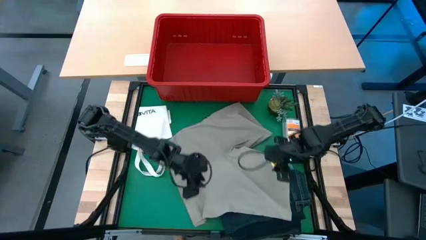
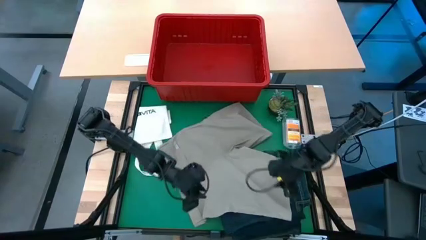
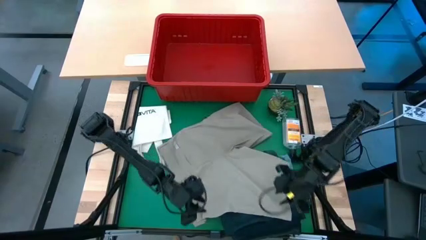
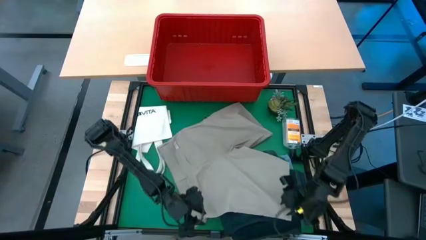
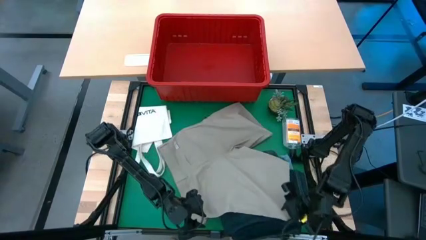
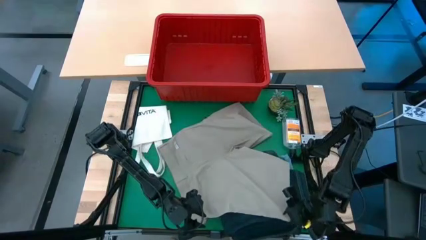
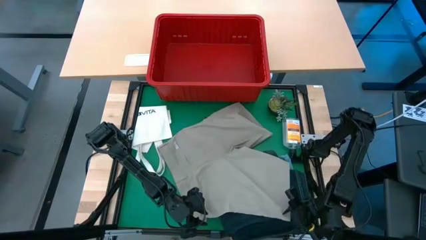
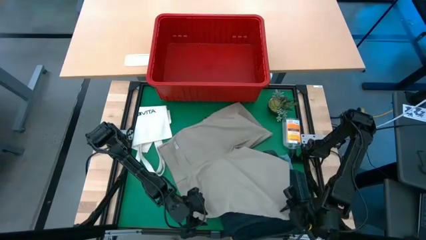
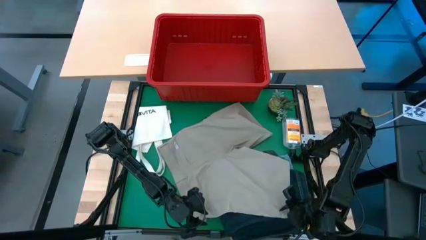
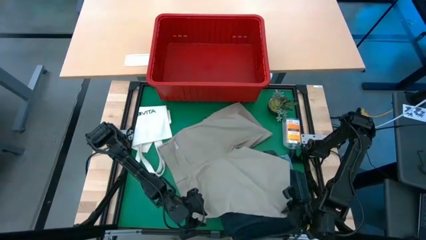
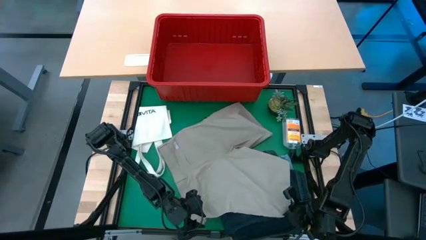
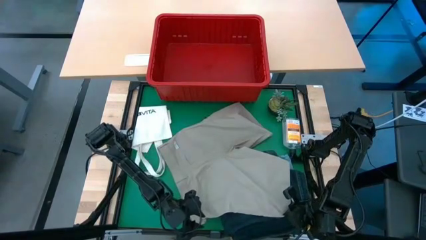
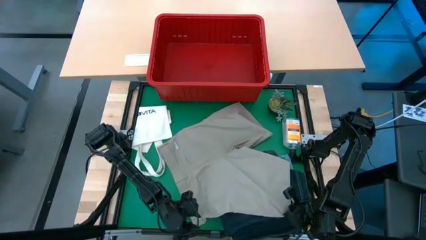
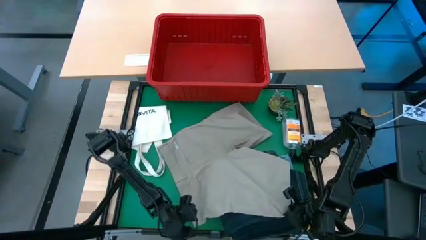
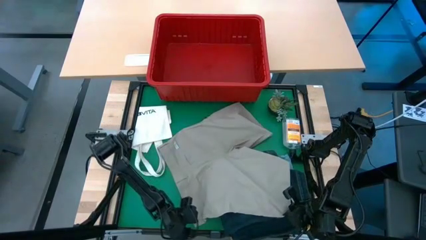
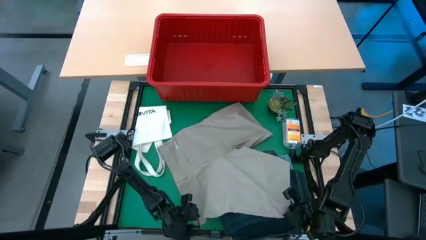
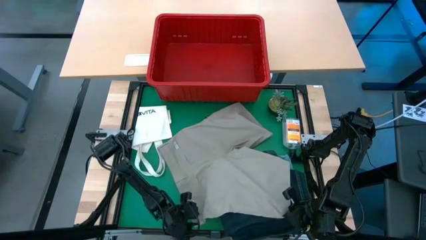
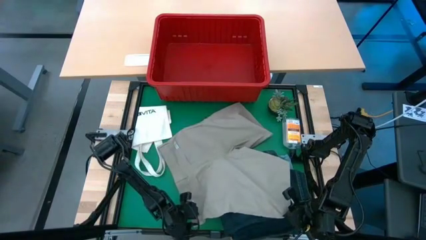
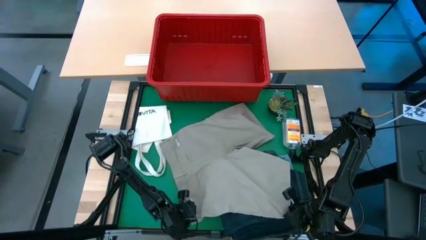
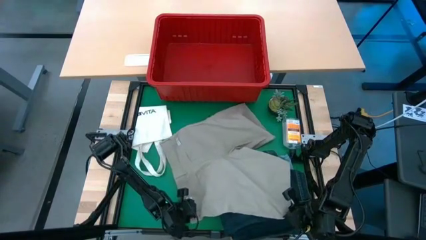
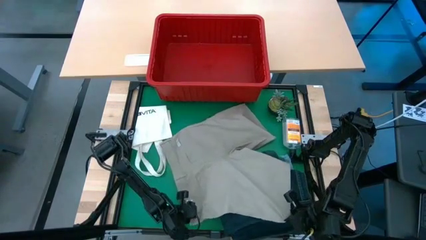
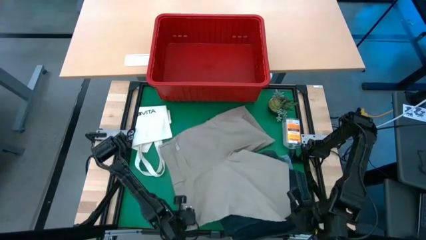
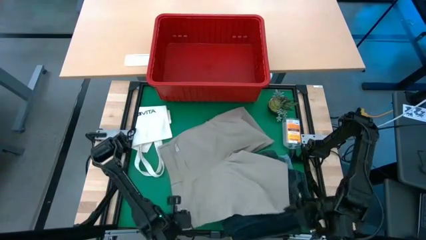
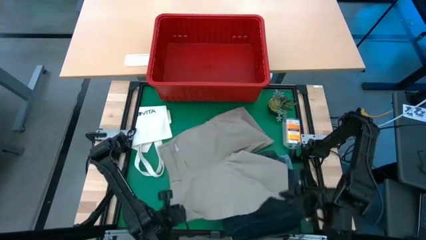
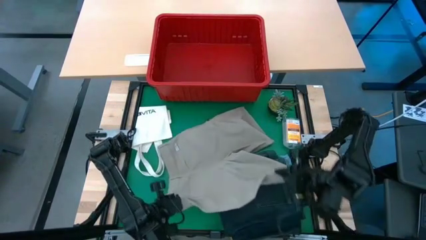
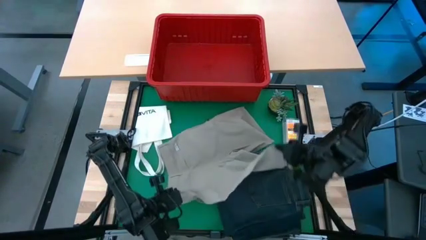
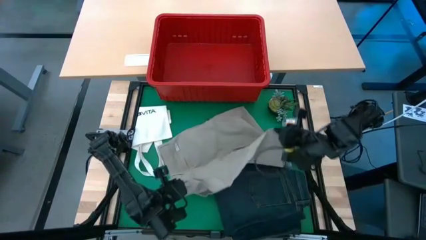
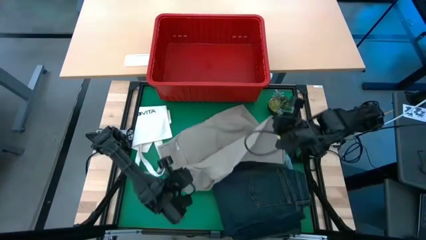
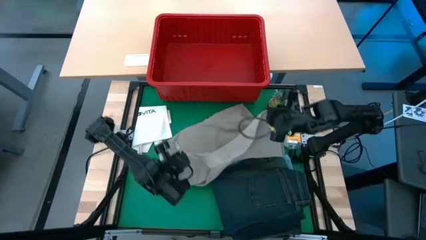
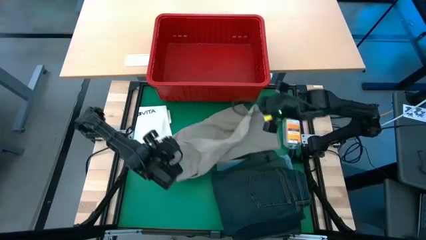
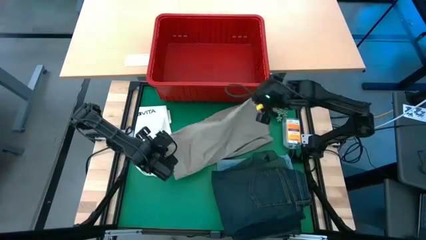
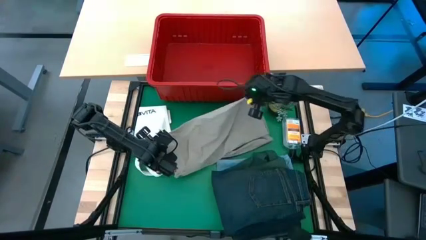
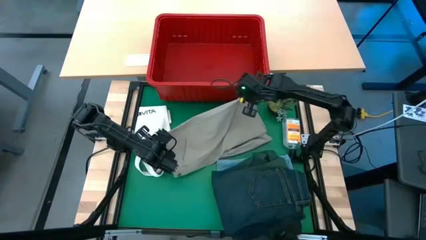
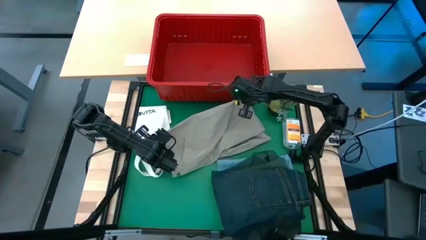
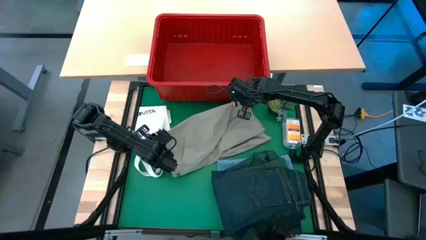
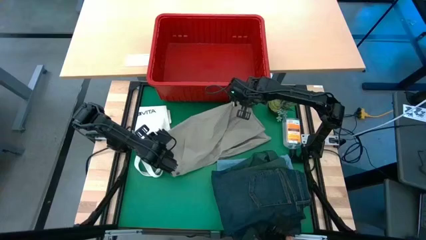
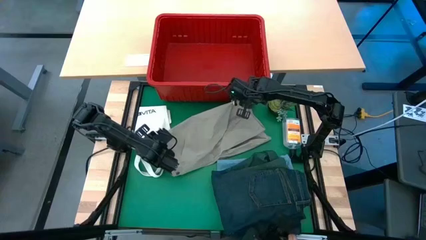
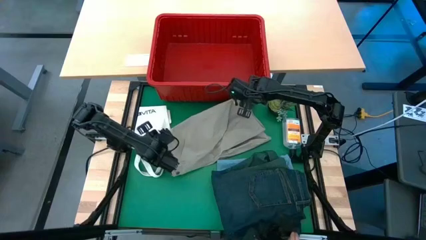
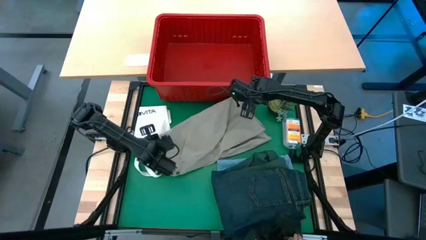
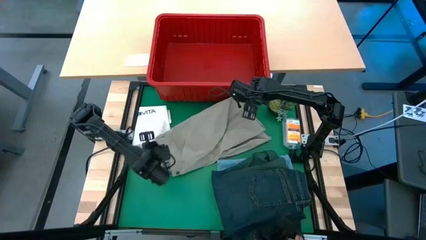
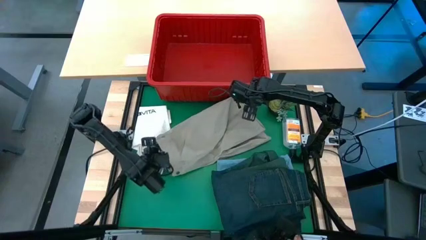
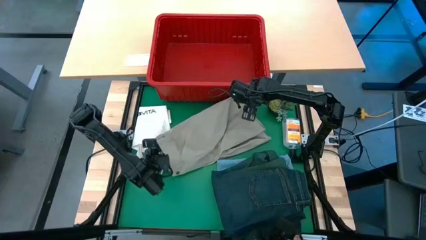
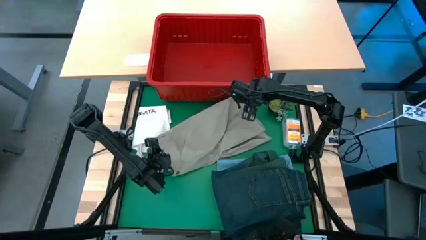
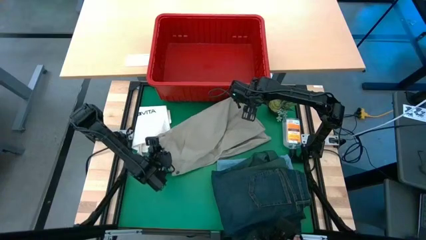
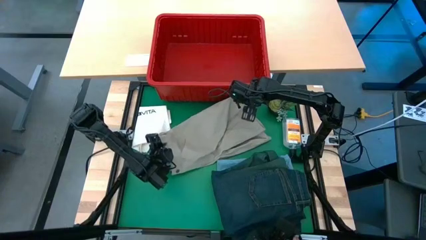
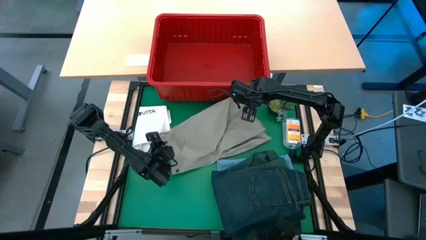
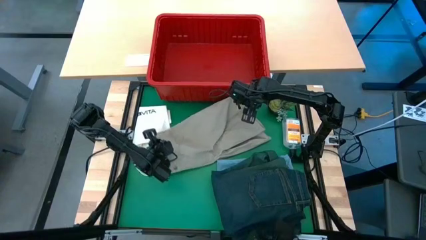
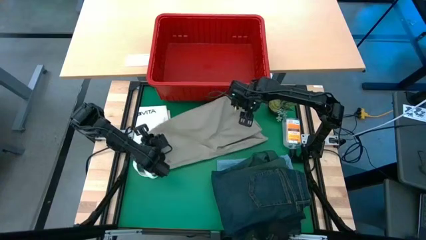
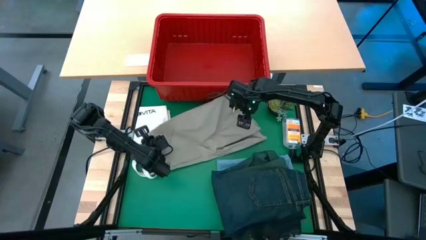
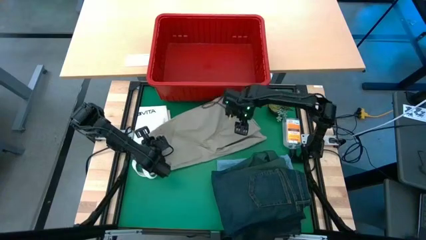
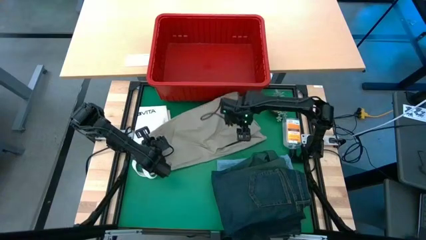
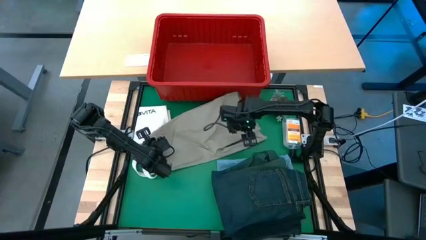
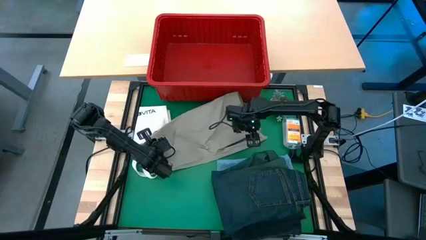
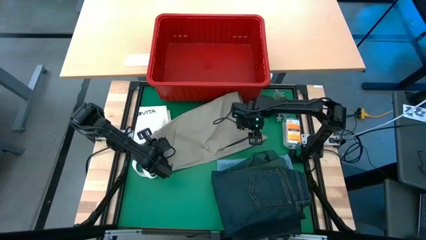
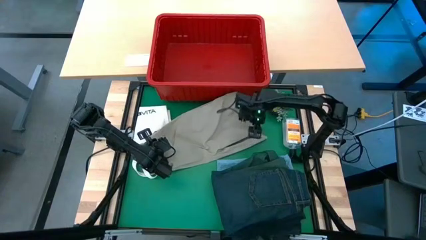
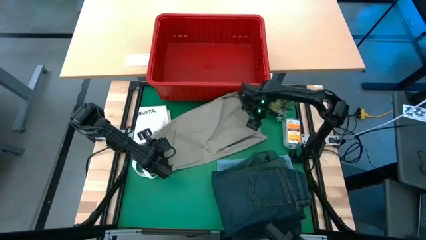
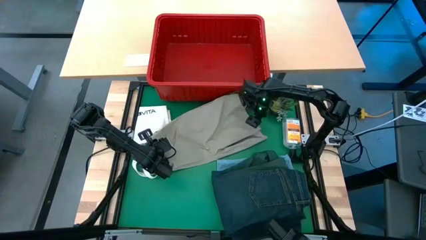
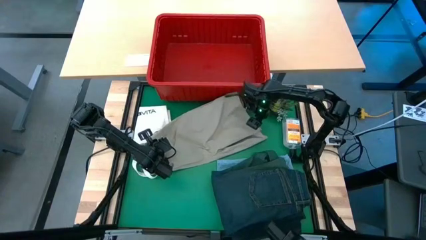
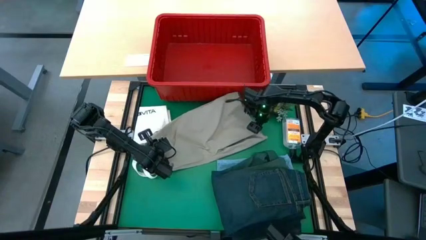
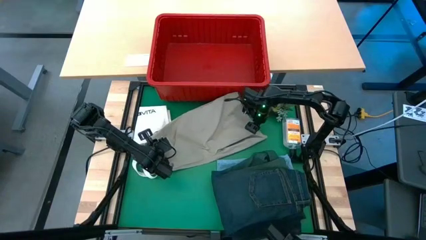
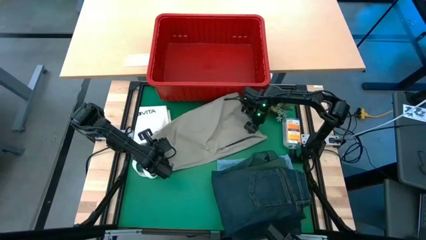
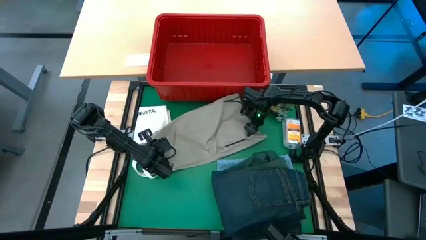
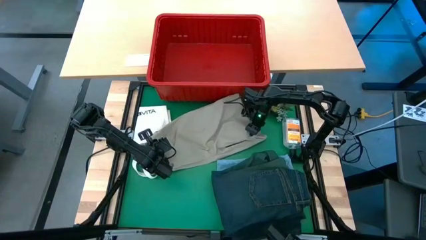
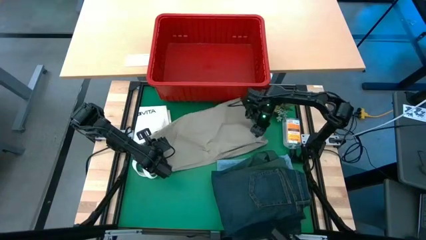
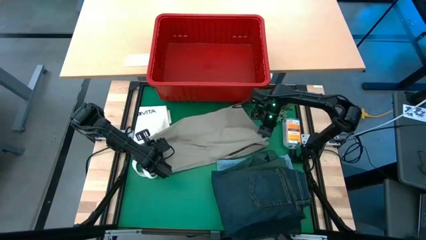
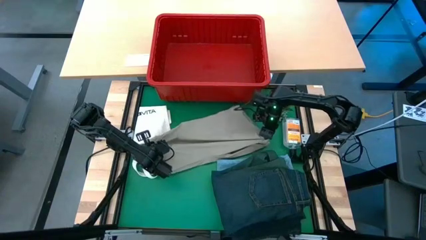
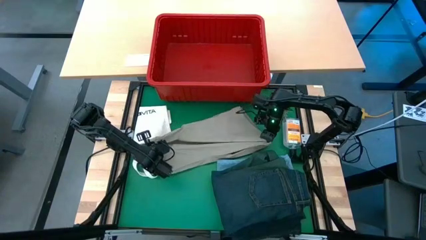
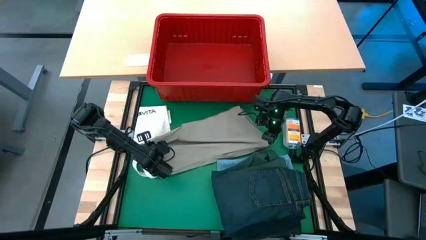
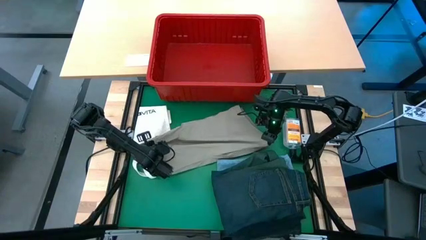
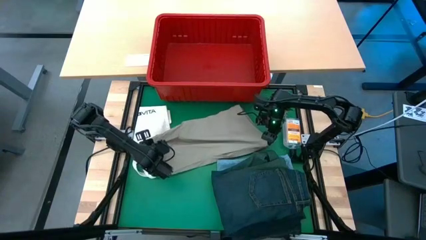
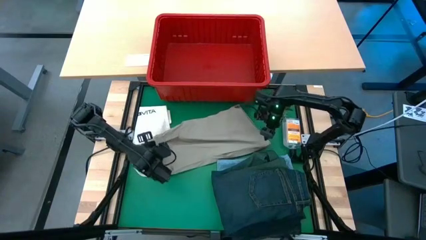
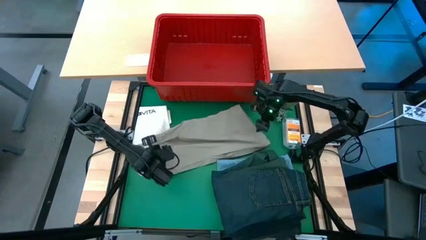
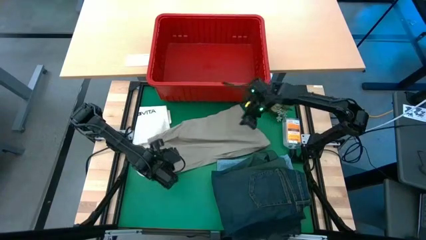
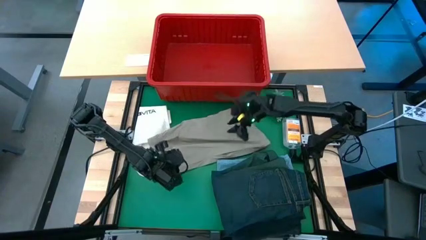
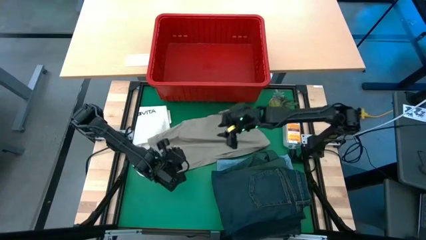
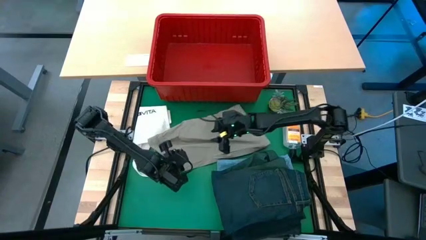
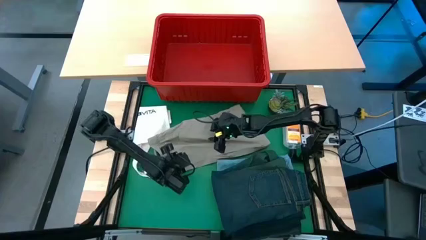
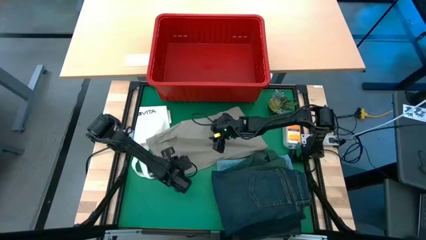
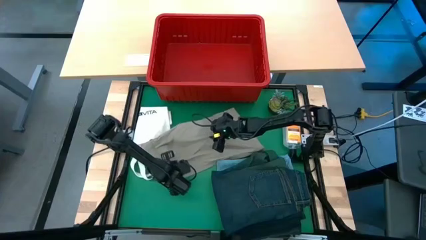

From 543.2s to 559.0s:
Task: Fold Laundry from Bin
Fold the brown shorts
